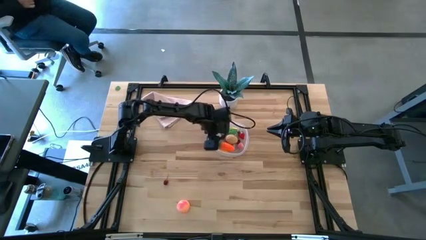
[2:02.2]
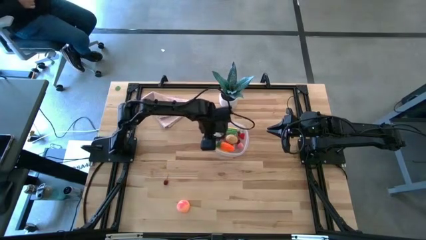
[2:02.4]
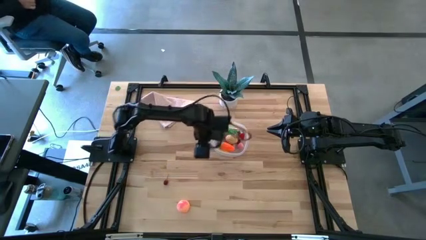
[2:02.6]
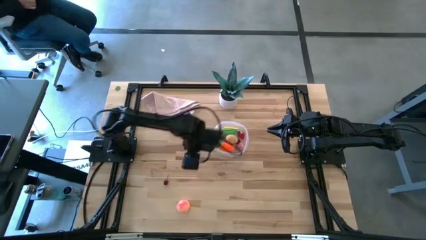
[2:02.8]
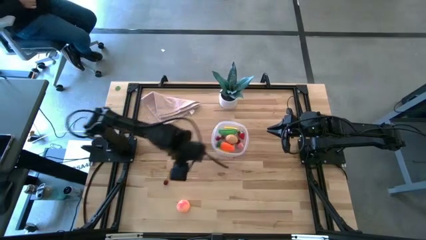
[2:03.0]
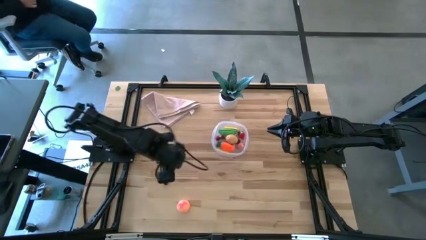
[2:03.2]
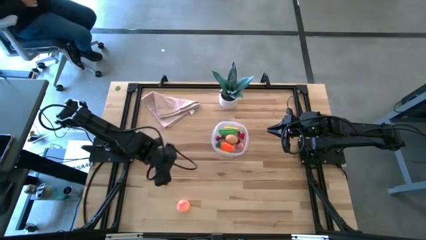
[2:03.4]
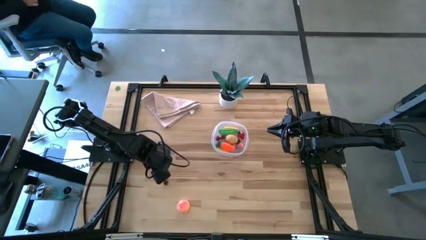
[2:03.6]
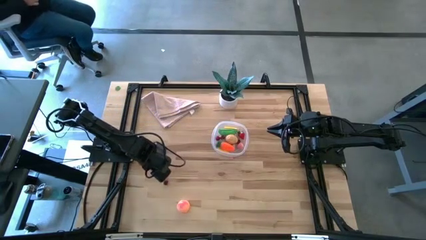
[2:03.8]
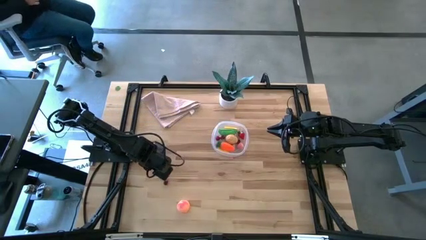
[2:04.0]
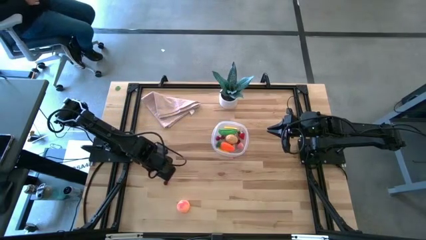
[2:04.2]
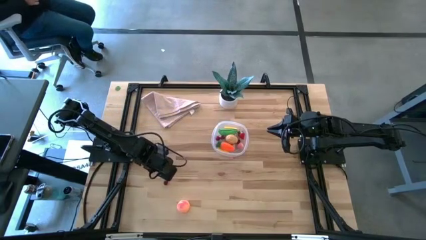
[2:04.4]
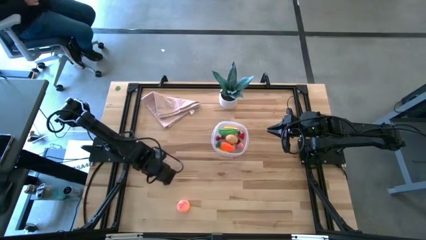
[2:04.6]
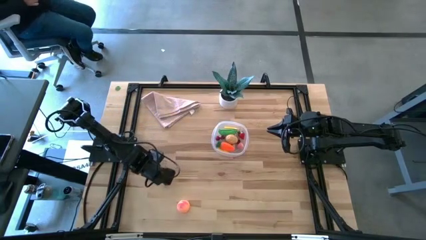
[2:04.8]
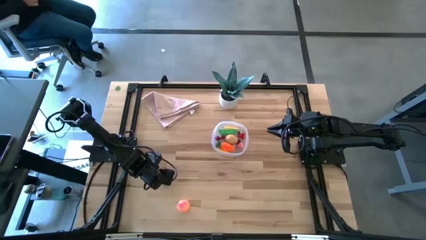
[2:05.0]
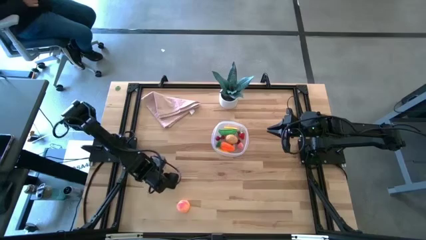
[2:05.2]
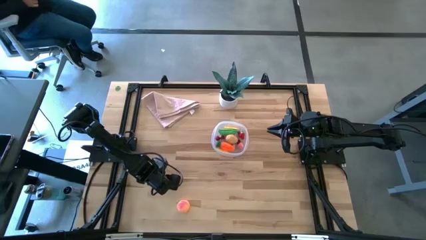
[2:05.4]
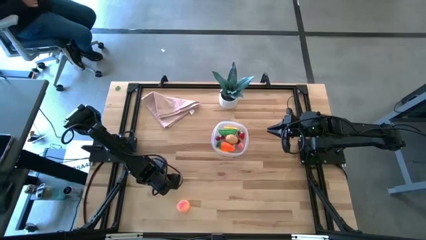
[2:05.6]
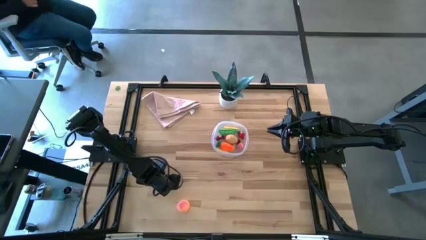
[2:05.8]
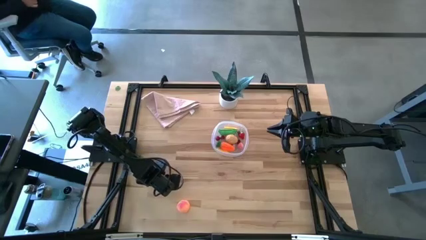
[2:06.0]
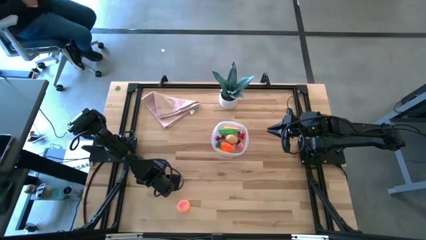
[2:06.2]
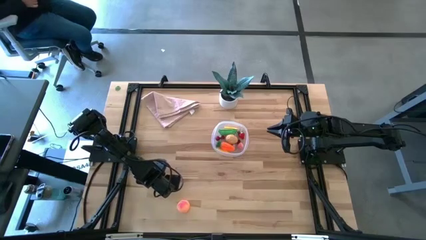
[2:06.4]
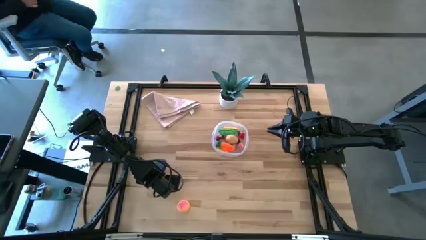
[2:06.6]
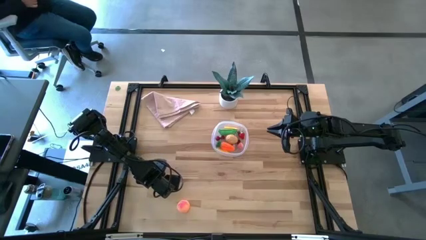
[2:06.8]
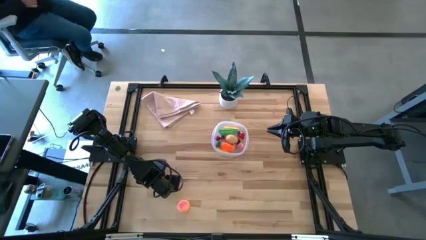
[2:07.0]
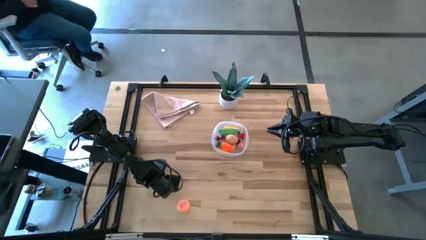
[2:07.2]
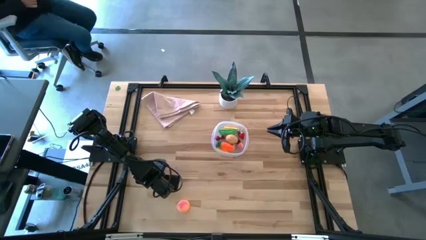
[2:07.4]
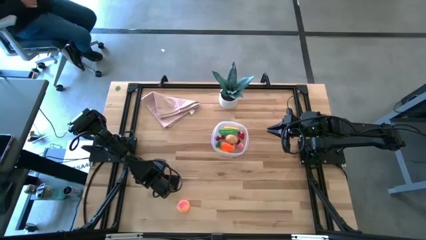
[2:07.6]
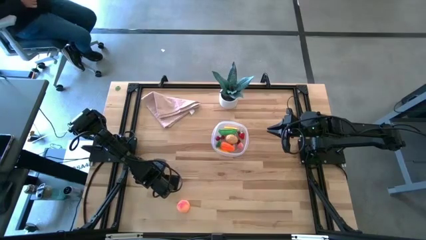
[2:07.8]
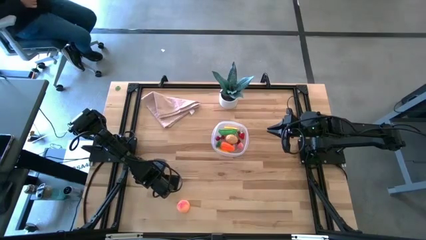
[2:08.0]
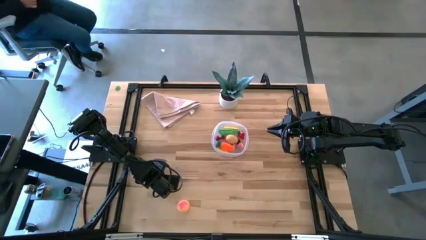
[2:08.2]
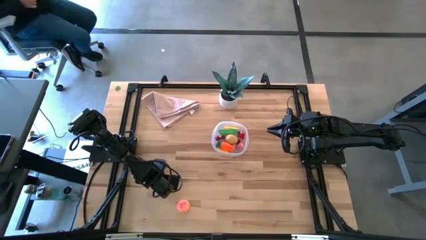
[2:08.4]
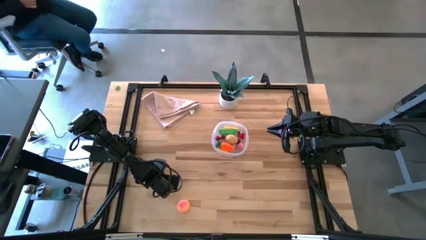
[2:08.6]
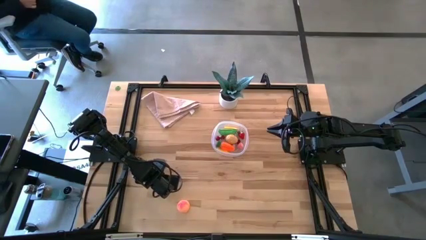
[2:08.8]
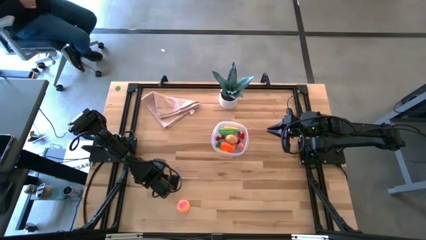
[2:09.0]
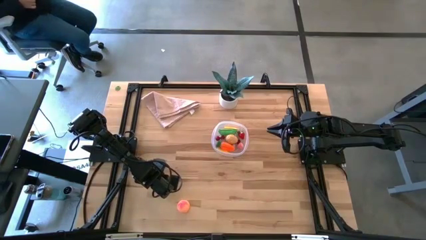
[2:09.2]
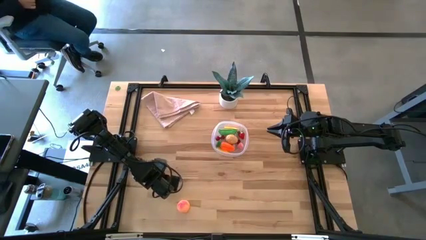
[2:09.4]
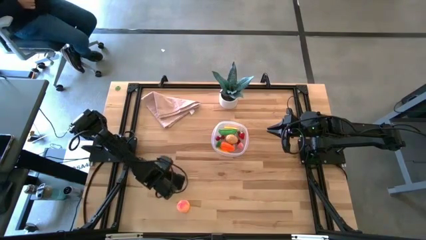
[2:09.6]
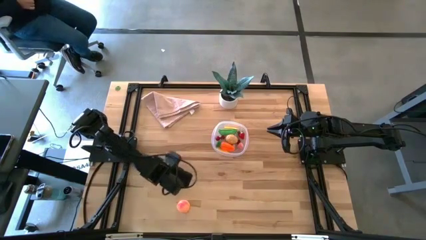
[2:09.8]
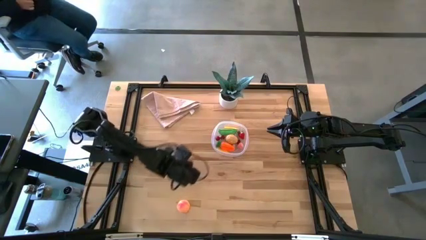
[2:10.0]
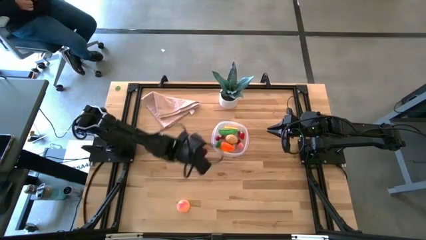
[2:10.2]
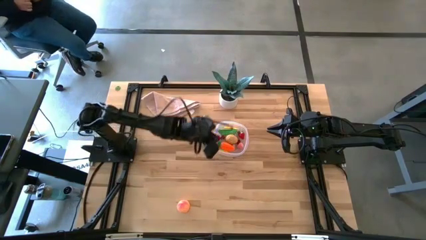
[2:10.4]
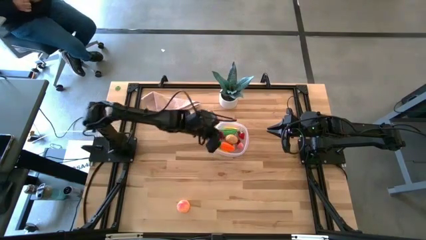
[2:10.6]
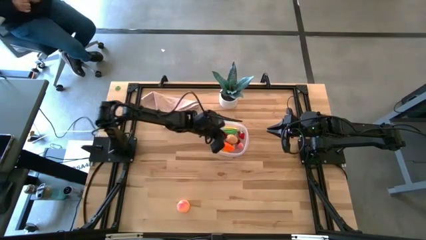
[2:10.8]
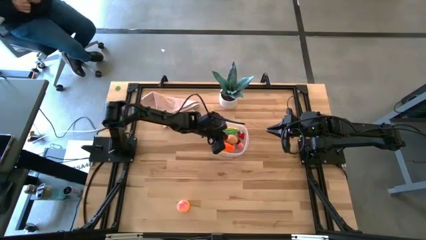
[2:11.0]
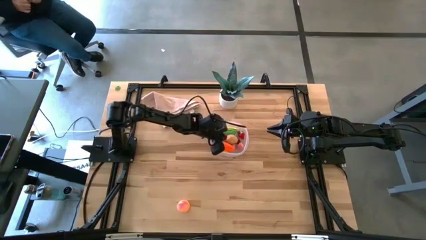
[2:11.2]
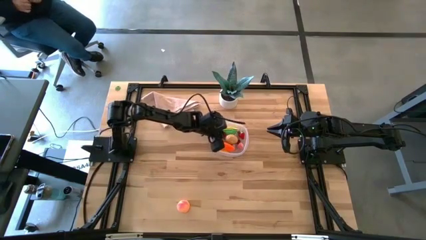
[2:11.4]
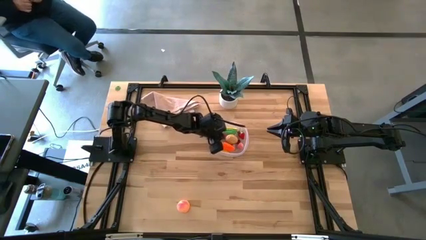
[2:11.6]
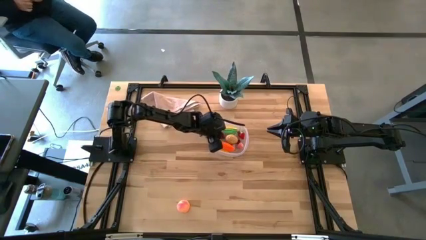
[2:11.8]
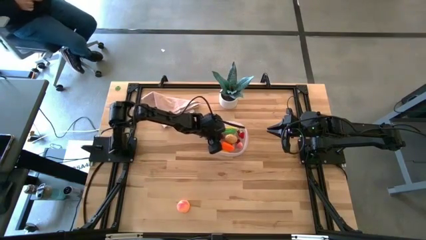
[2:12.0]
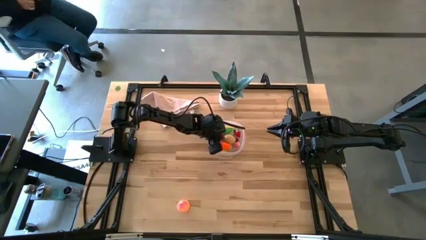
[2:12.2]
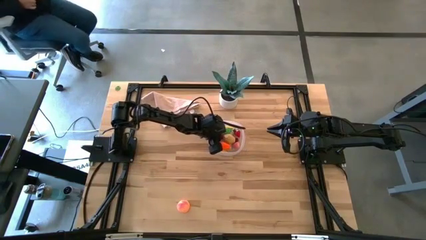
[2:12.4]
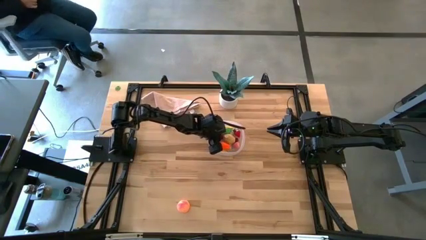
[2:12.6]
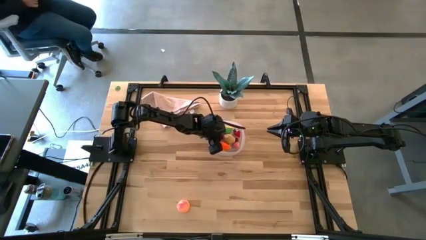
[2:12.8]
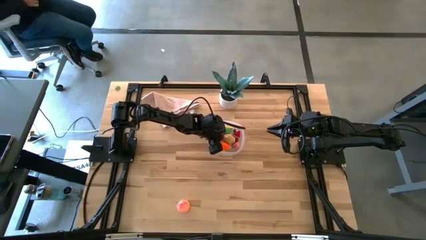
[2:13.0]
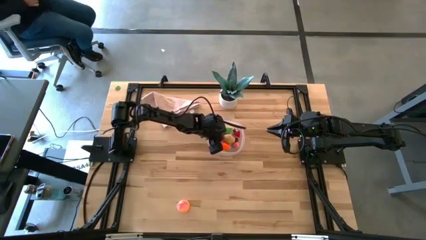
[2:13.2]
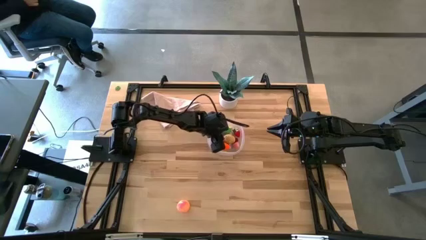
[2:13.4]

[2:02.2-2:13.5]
Task: Pick and placing Produce into tupperware
Put the cherry into the transparent bin

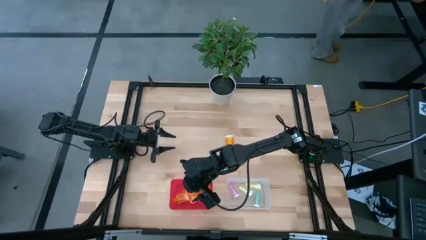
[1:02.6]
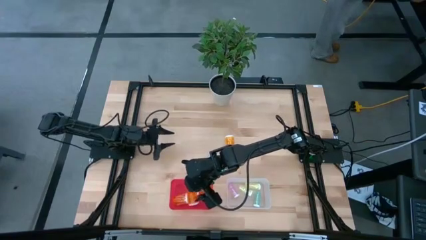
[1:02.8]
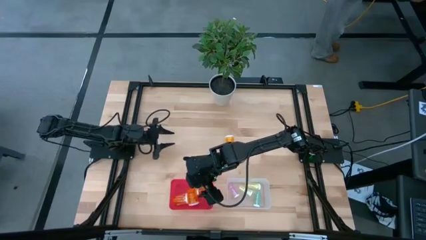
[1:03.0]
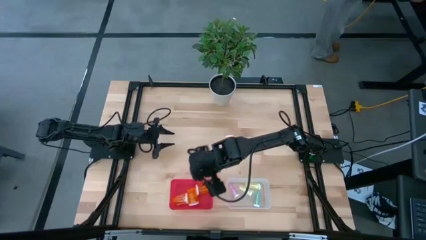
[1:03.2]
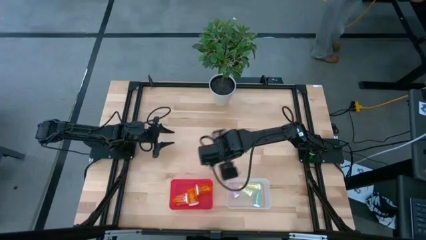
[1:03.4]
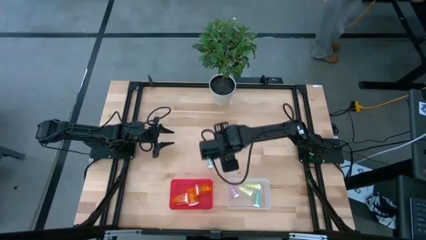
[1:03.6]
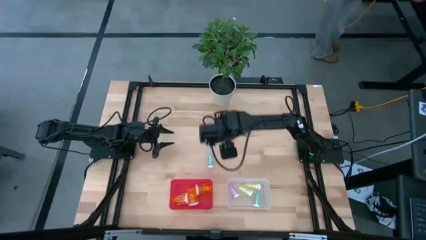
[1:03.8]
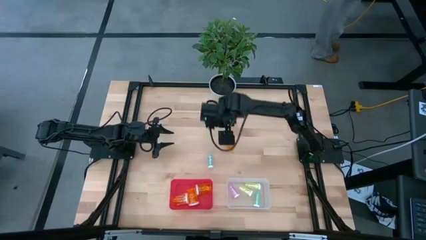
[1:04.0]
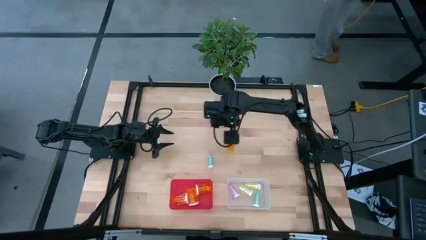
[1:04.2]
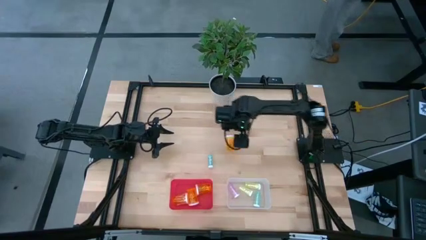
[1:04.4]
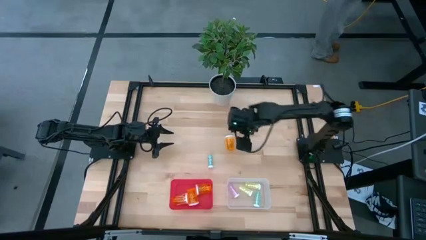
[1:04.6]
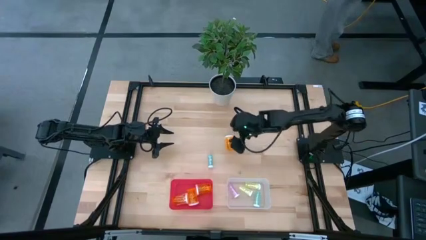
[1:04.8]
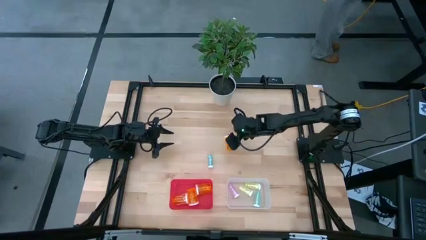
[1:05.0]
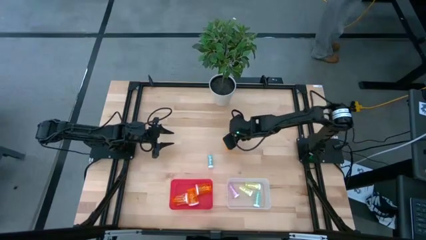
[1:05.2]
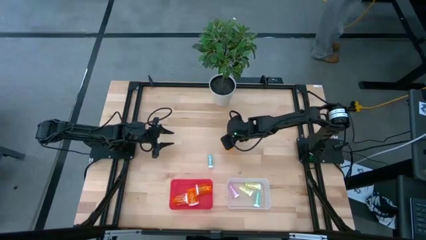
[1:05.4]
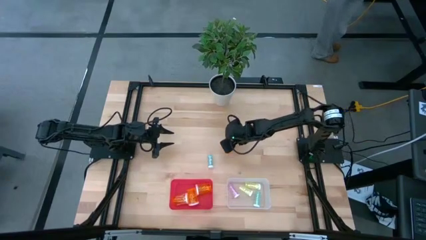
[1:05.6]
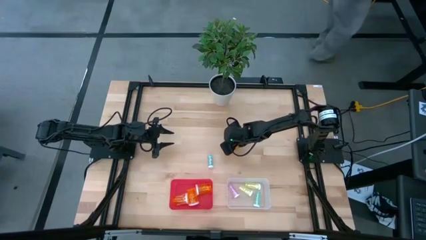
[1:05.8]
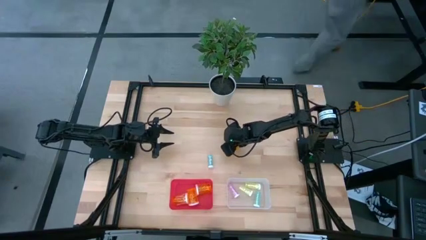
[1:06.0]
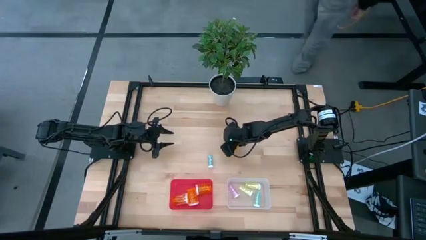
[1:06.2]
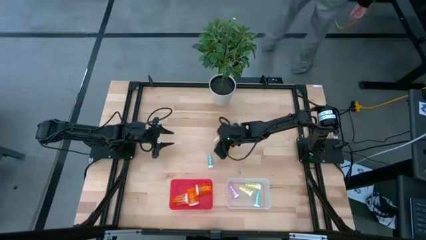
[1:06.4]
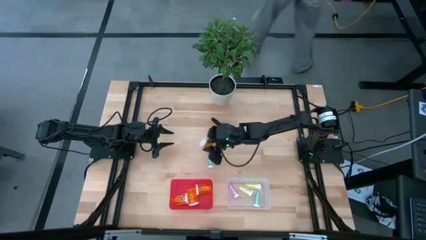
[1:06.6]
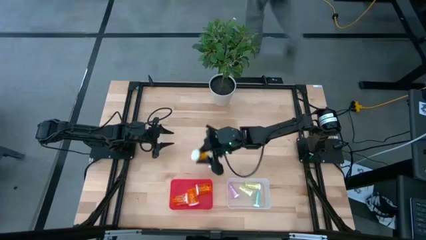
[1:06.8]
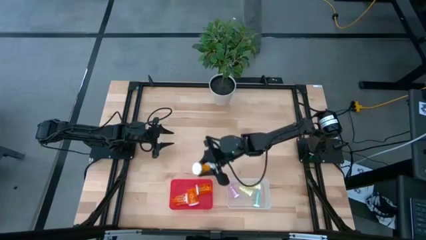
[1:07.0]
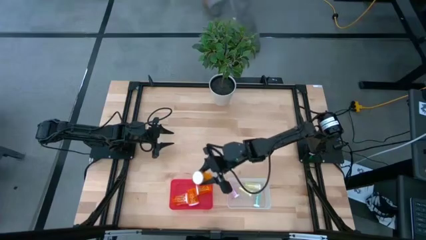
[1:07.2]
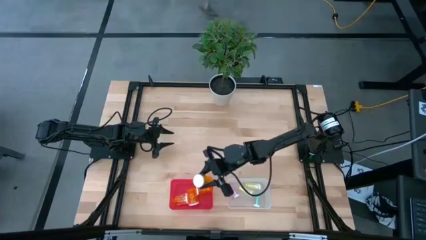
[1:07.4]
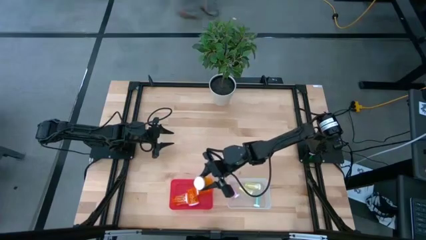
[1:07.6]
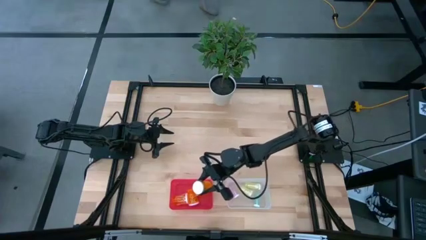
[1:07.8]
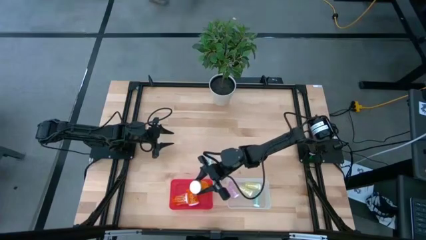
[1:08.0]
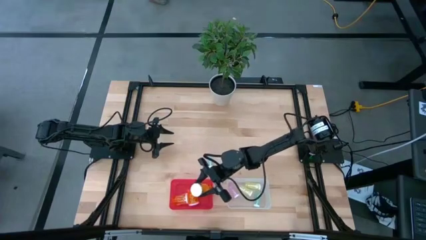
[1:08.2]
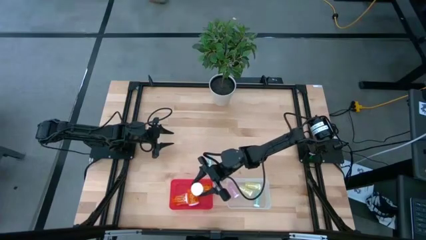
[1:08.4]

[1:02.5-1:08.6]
Task: Pick and place medicine bottles into bin by pill shape (circle, oval)
Put the large orange pill bottle into the red bin
